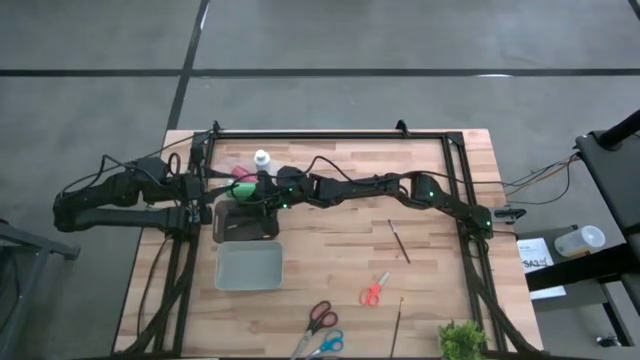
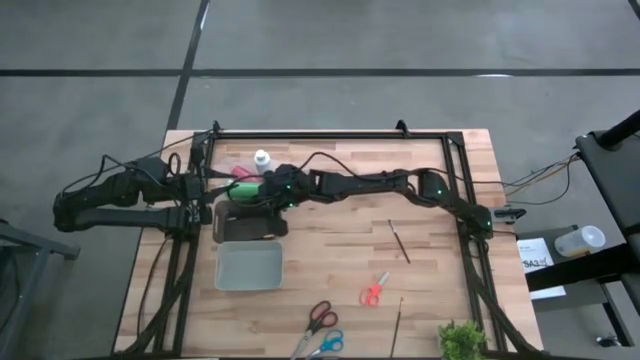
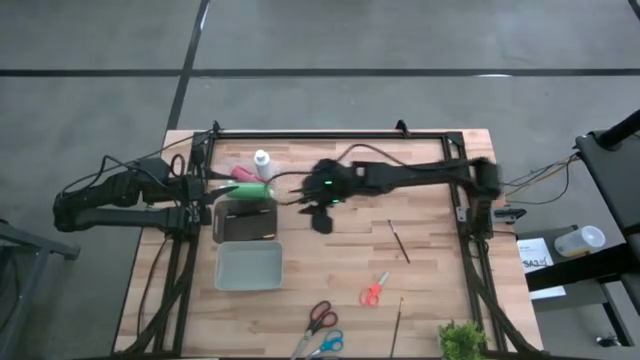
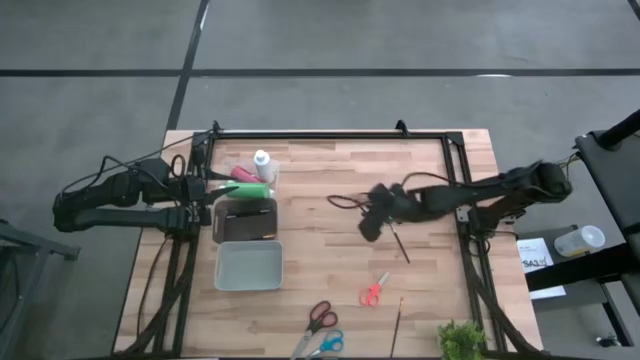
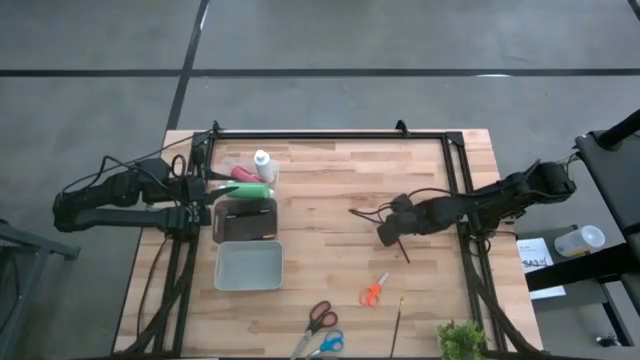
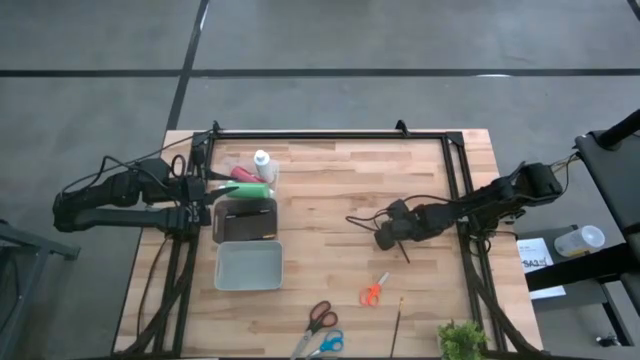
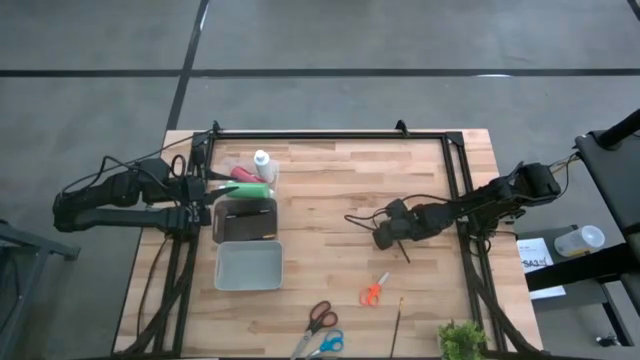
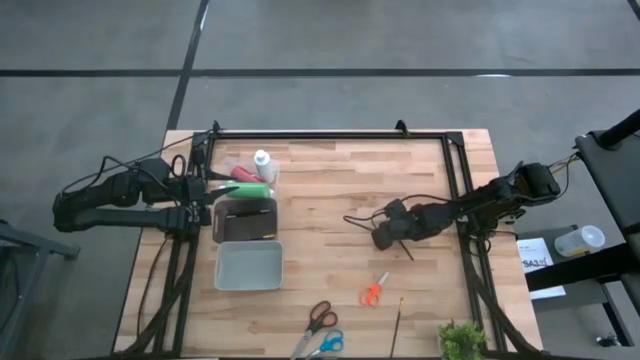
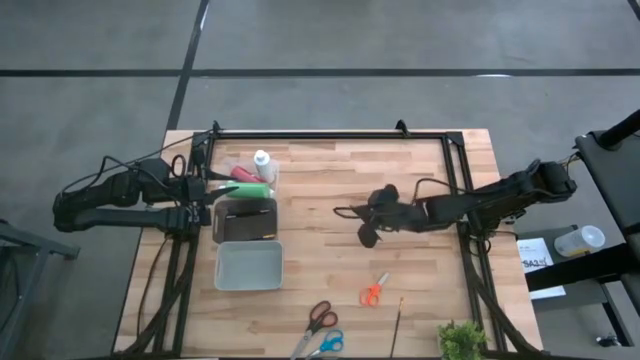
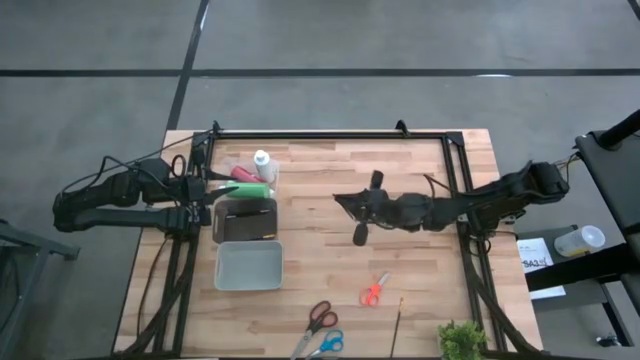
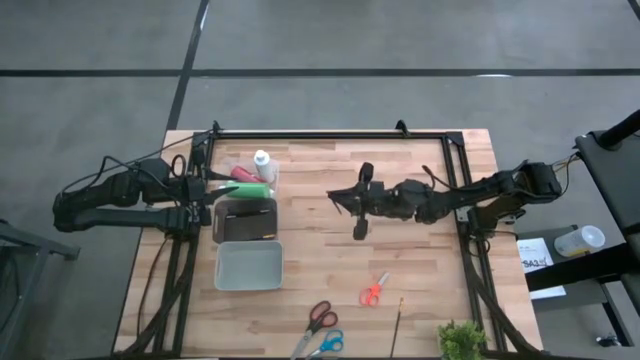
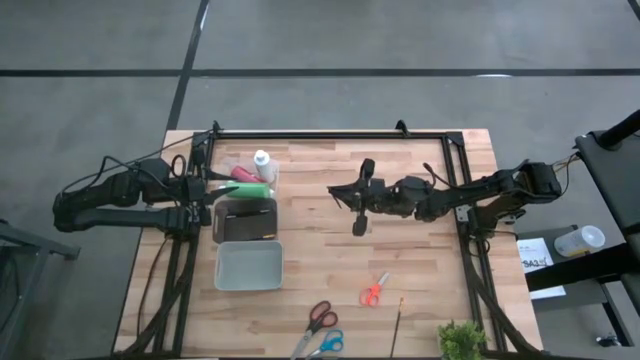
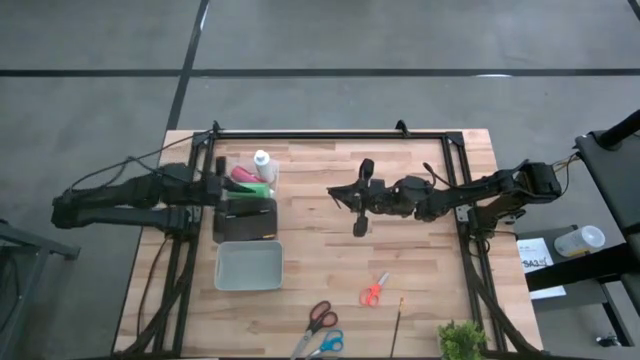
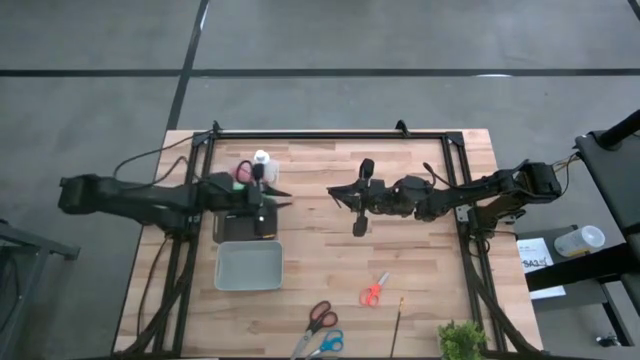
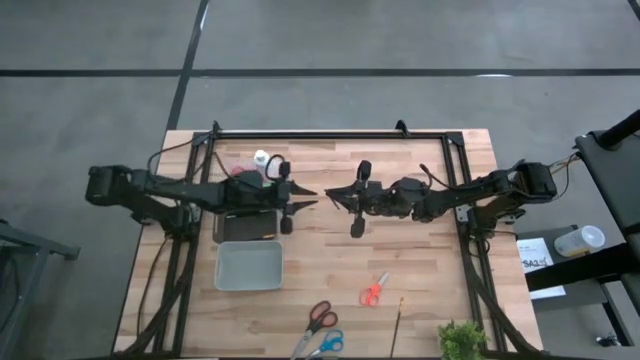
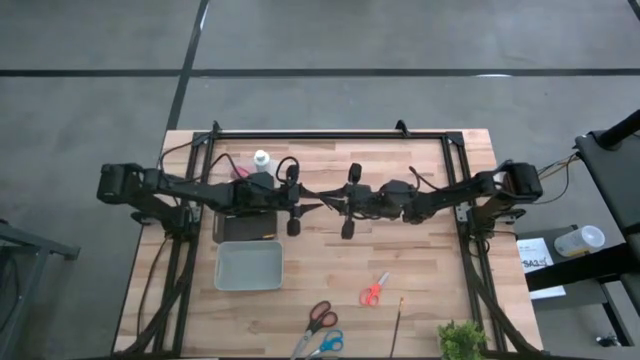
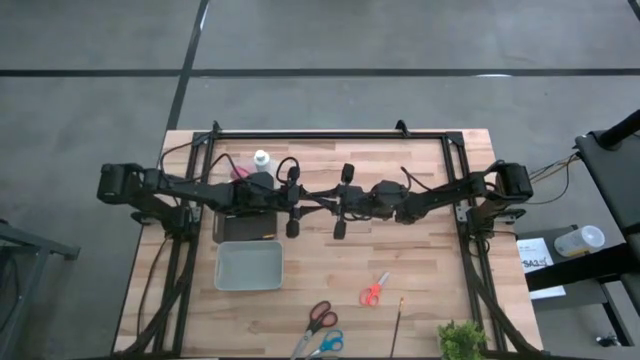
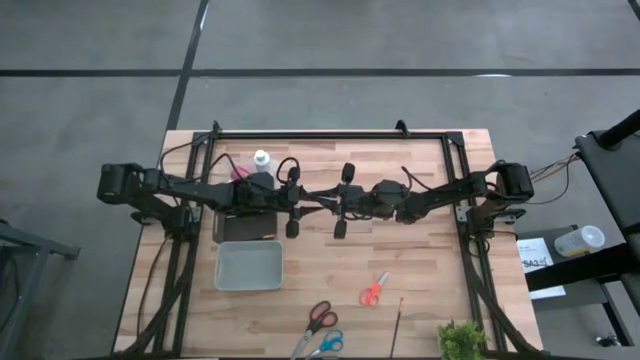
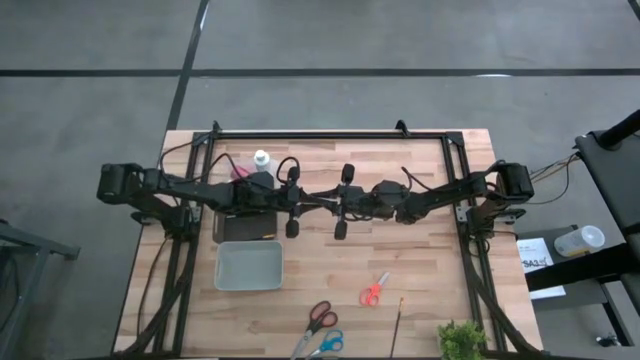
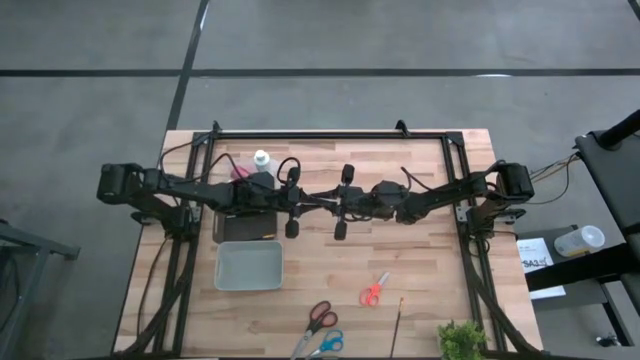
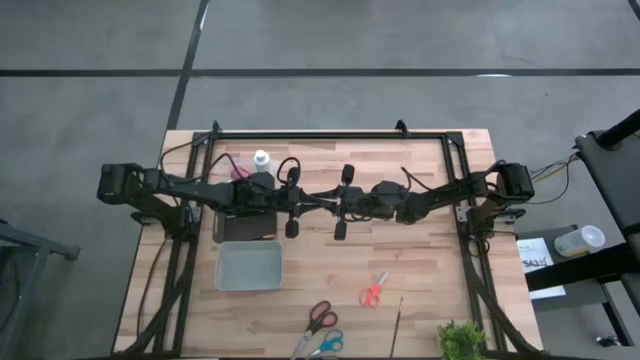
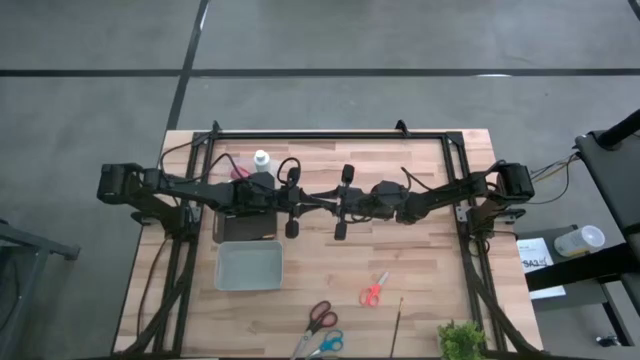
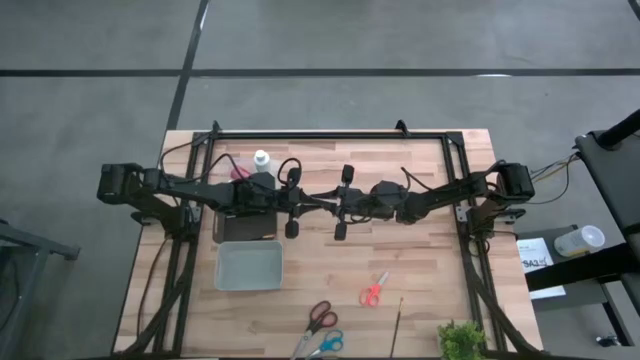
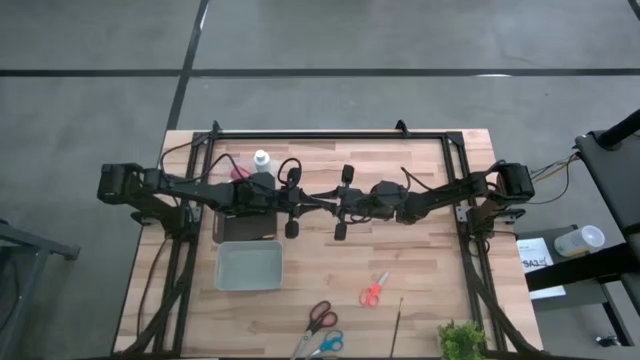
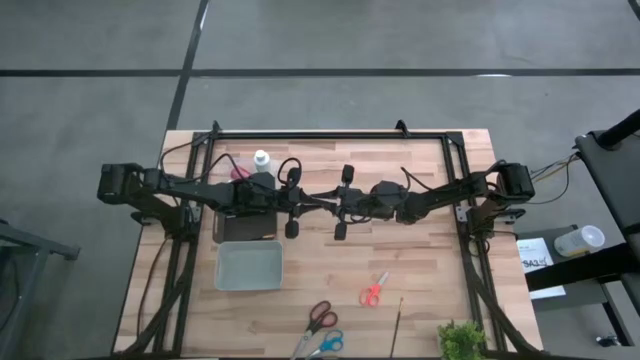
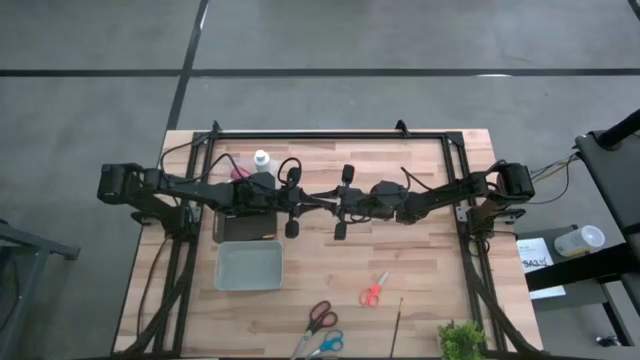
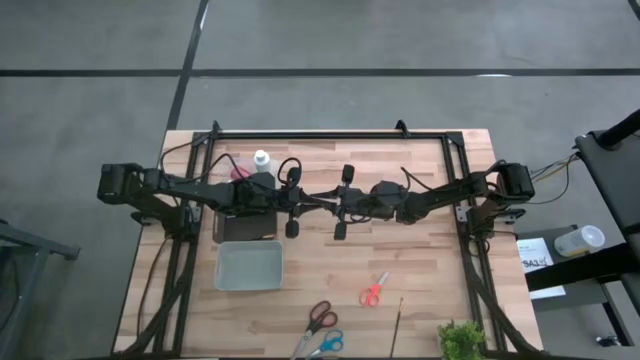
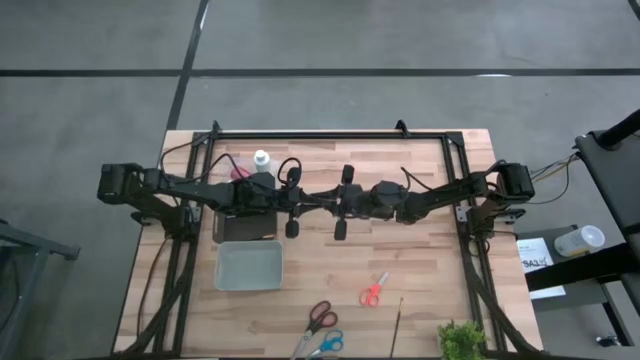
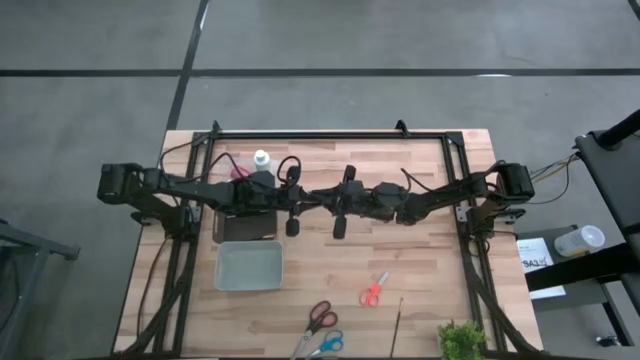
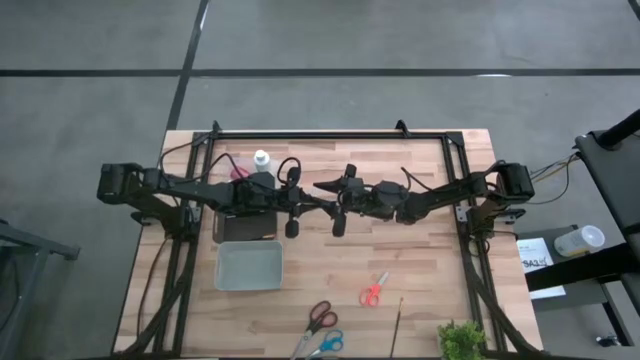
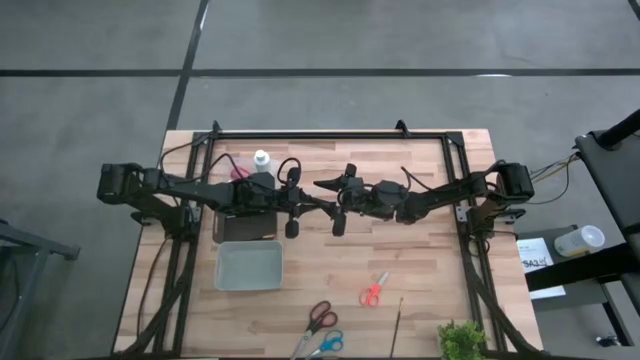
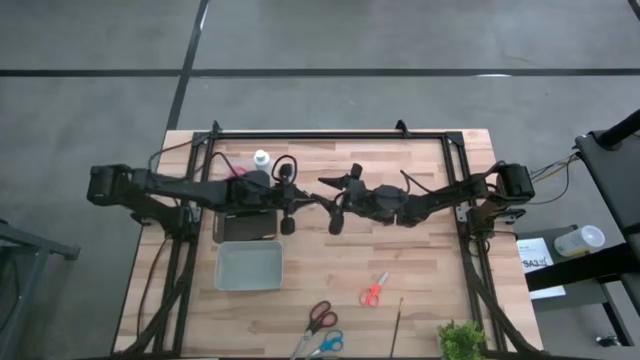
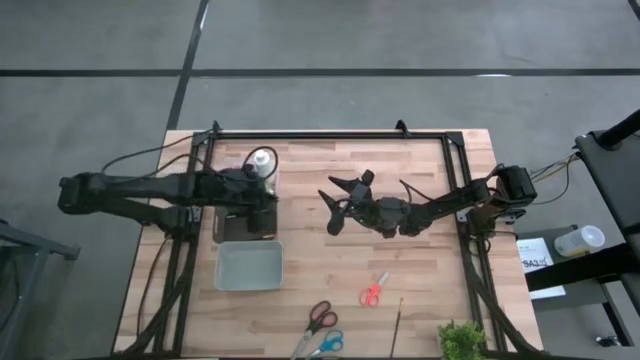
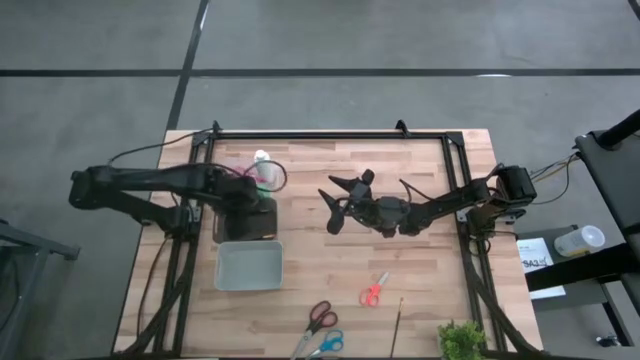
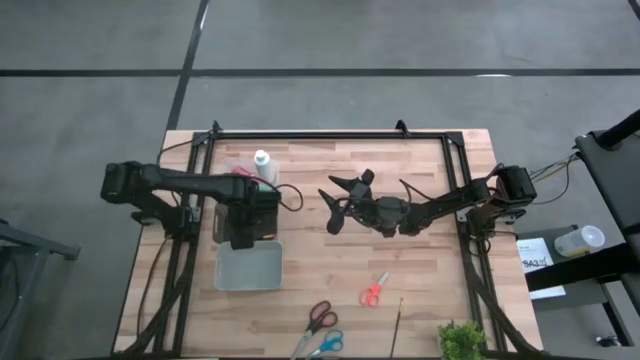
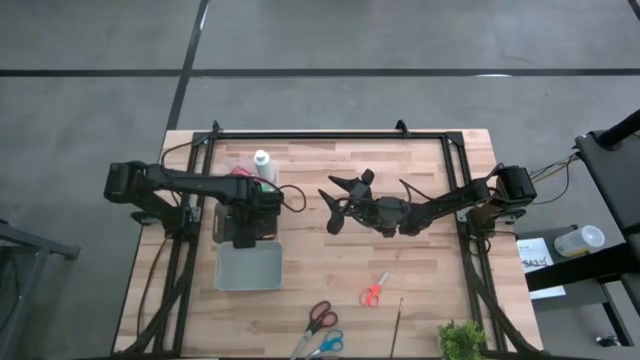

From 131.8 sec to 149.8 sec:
Task: Pick & Place Paint Supplies
Put the silver makeup brush into the black bin

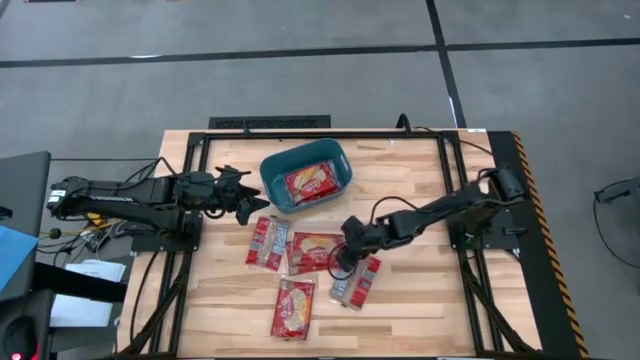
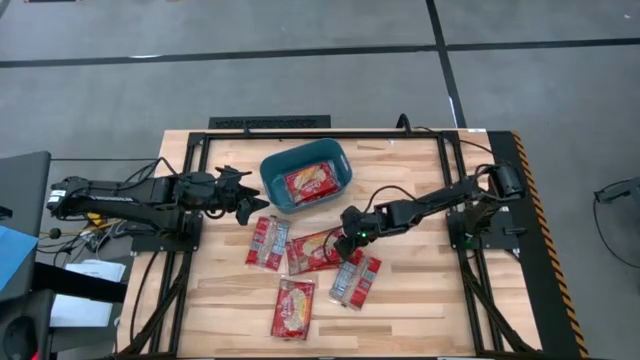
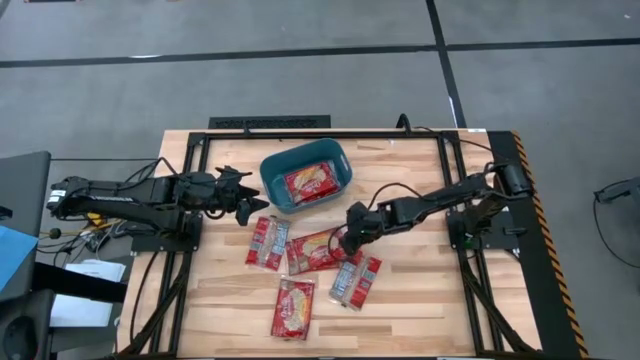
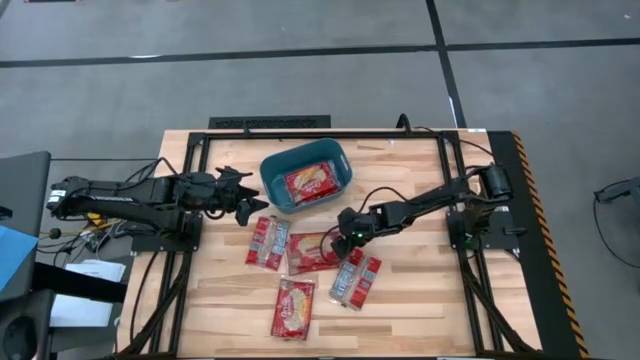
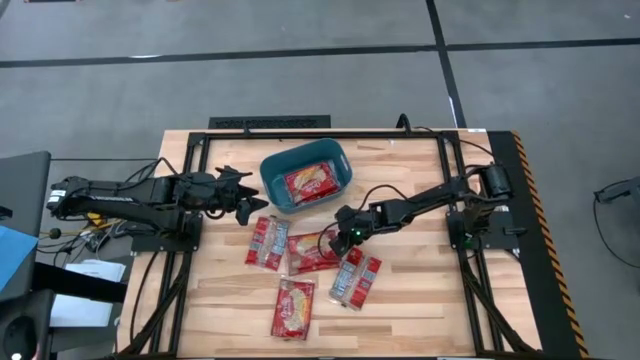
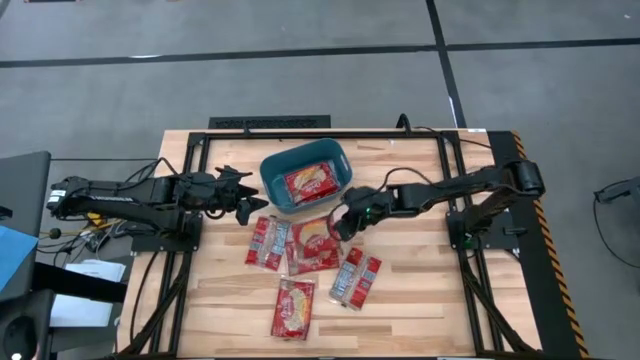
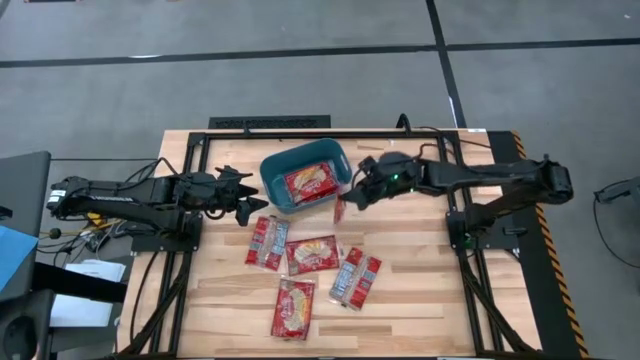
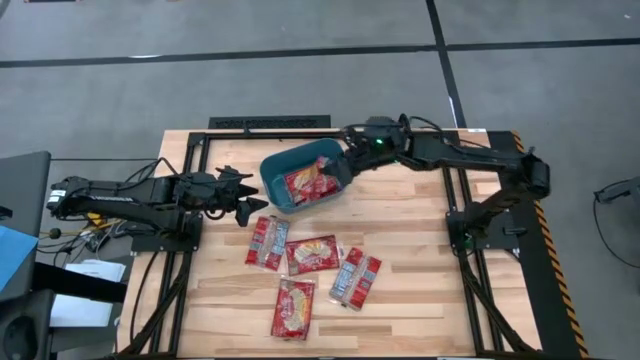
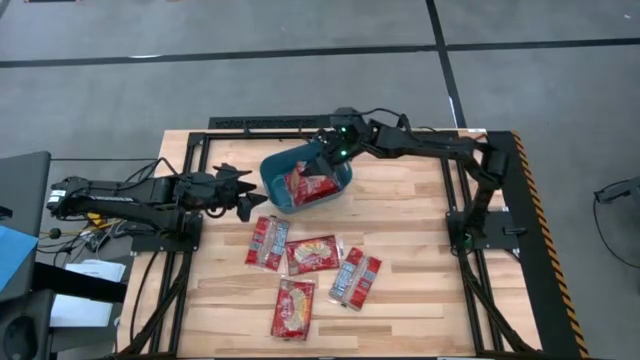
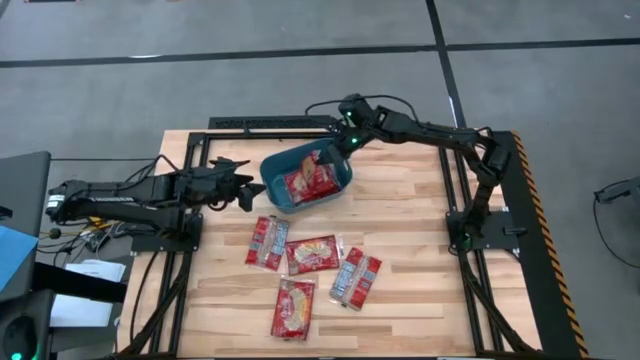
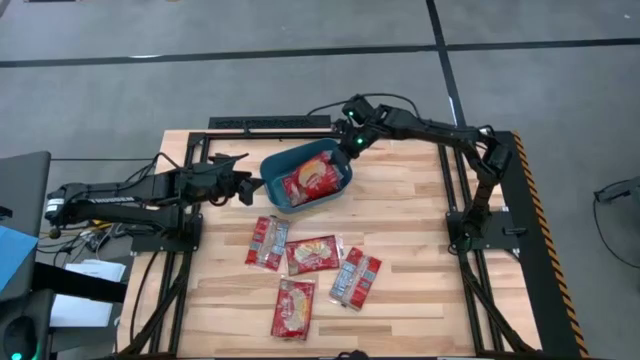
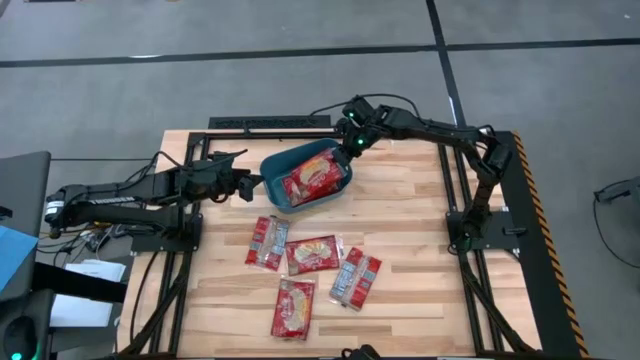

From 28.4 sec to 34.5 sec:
Task: Sort popcorn bags into baskets
Put the red popcorn bag into the blue bin
